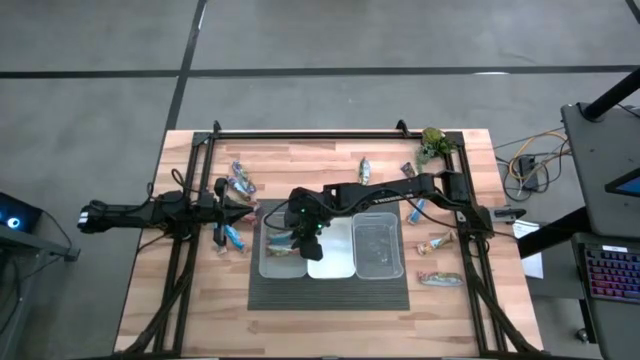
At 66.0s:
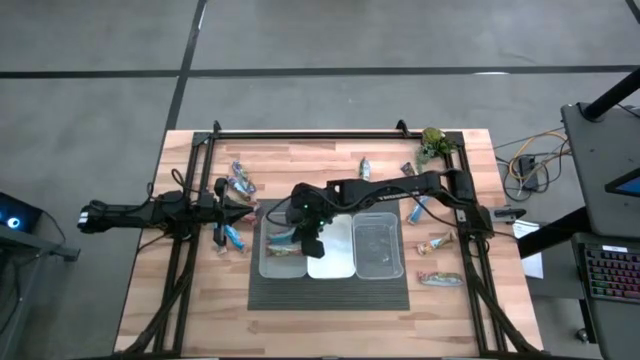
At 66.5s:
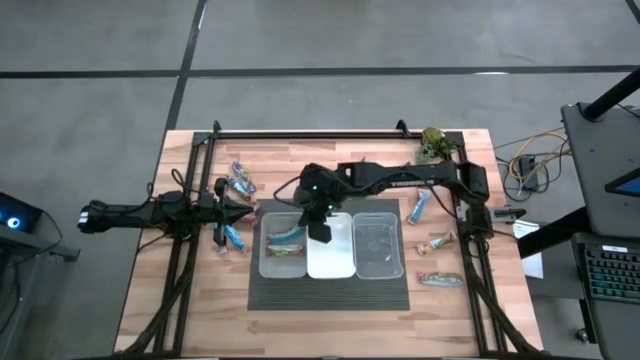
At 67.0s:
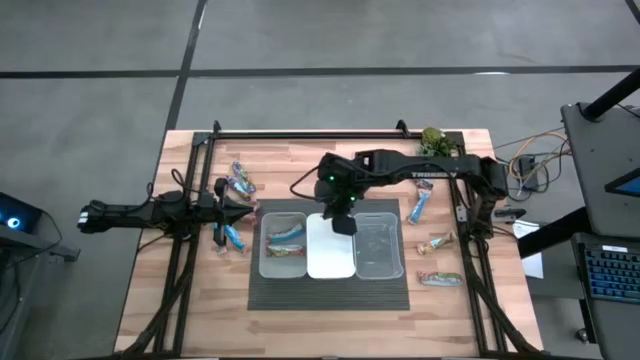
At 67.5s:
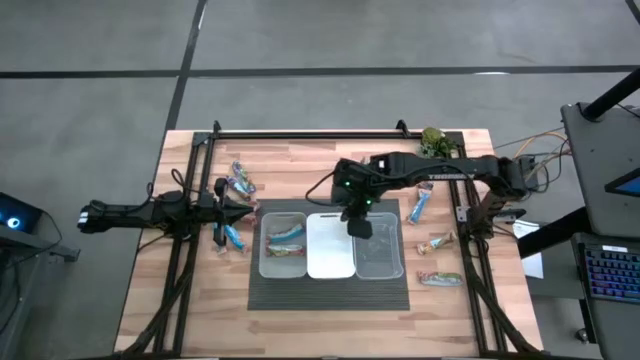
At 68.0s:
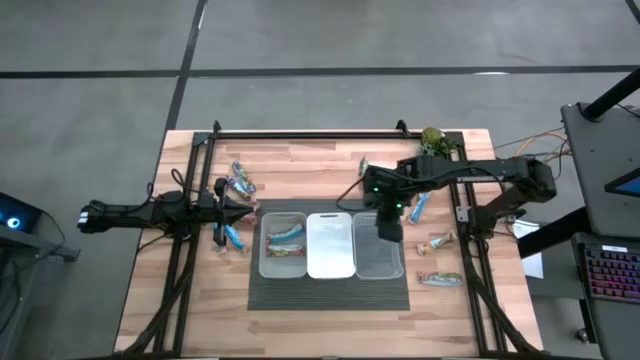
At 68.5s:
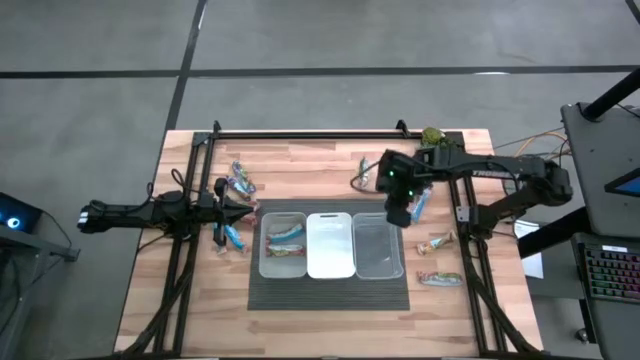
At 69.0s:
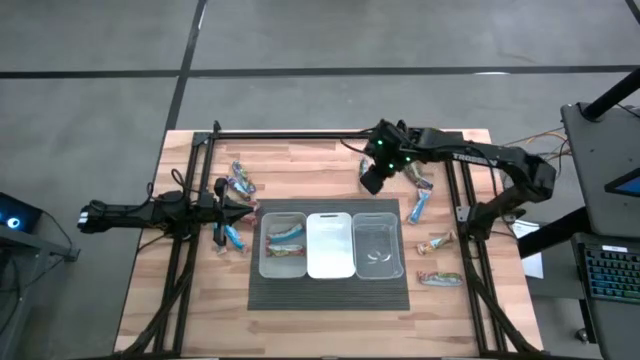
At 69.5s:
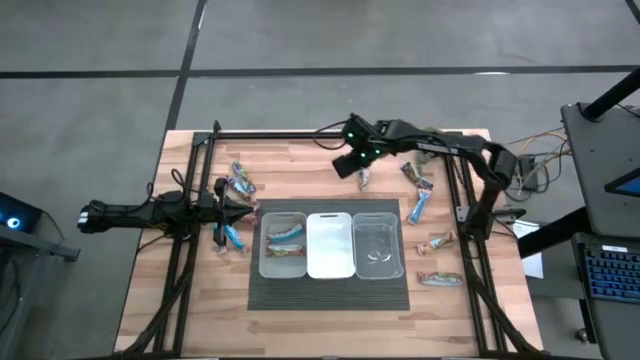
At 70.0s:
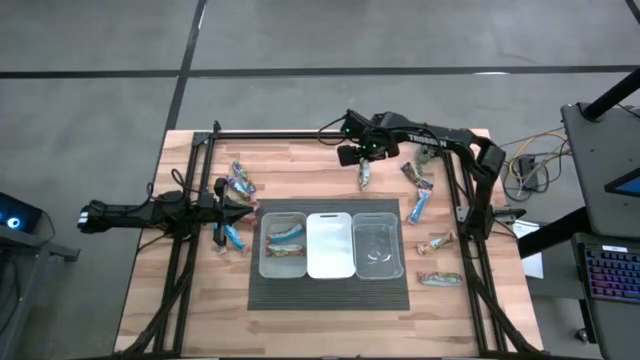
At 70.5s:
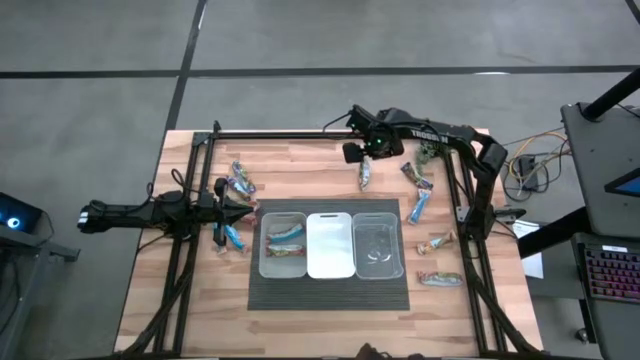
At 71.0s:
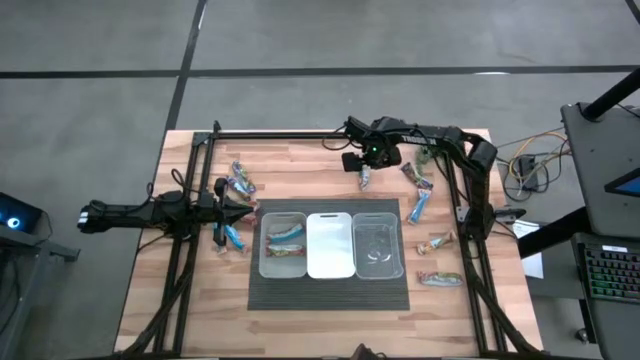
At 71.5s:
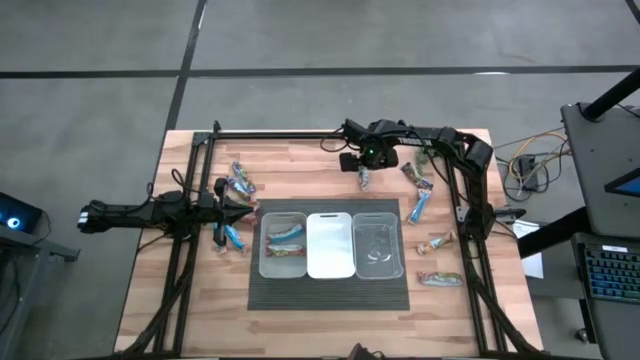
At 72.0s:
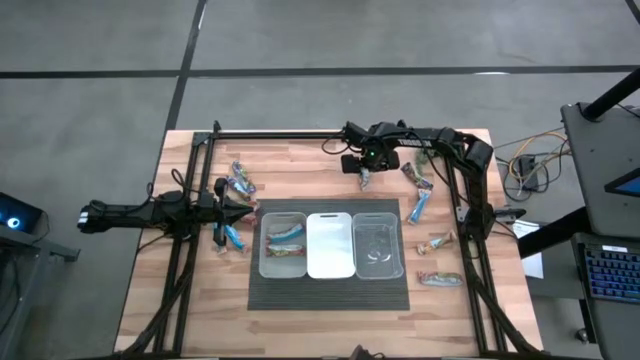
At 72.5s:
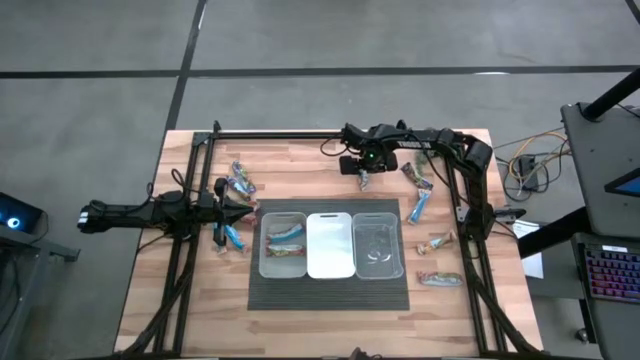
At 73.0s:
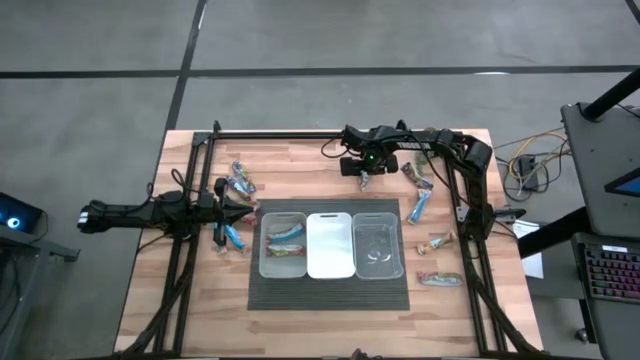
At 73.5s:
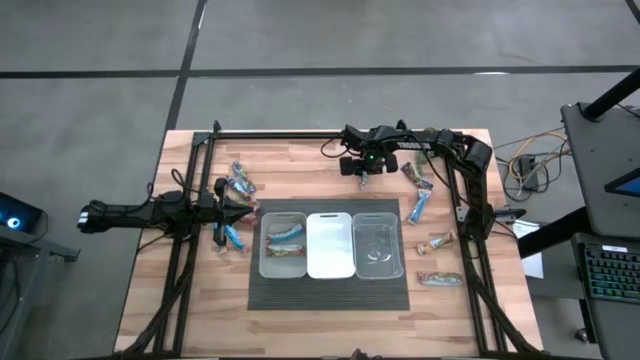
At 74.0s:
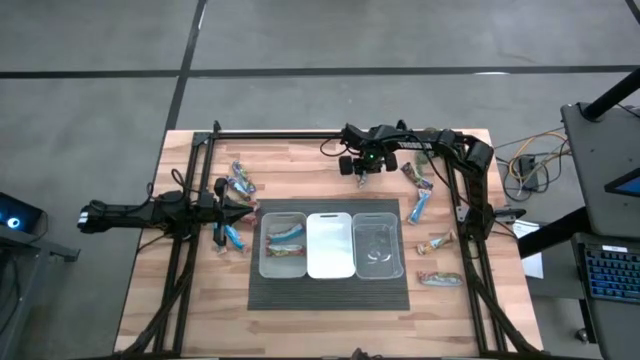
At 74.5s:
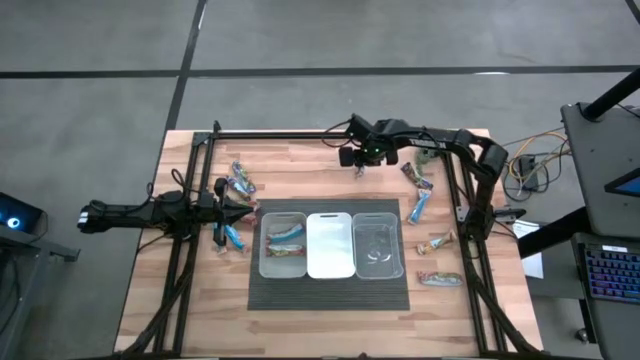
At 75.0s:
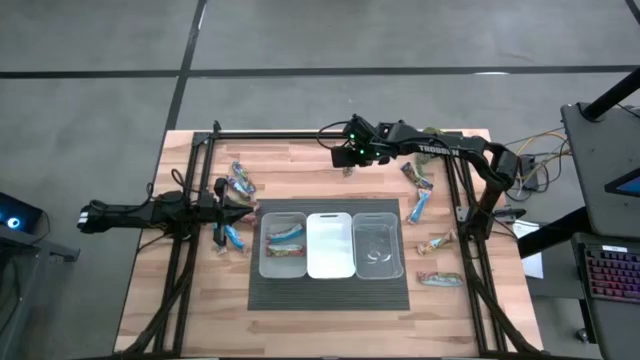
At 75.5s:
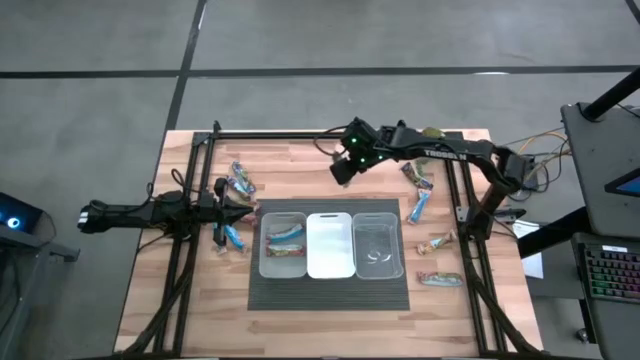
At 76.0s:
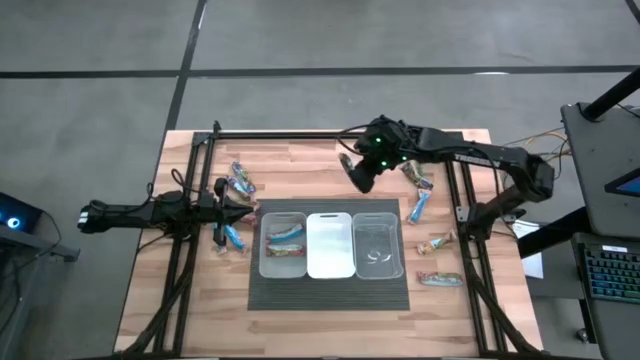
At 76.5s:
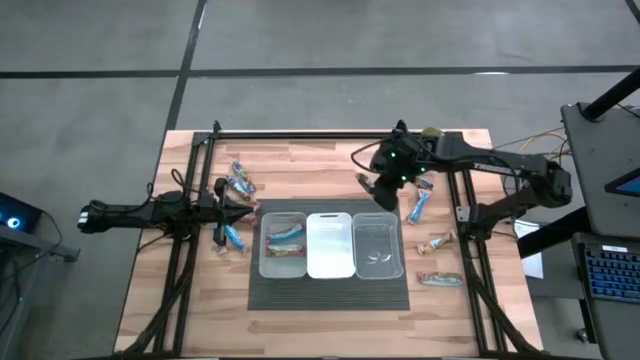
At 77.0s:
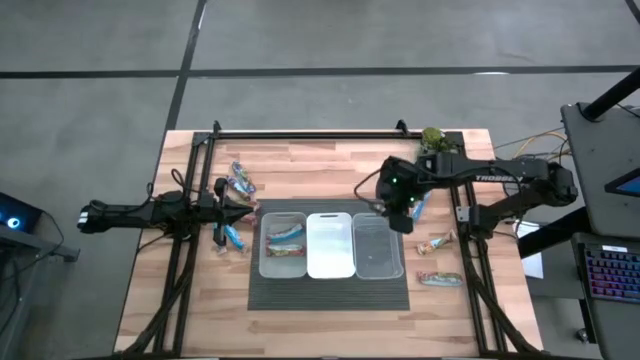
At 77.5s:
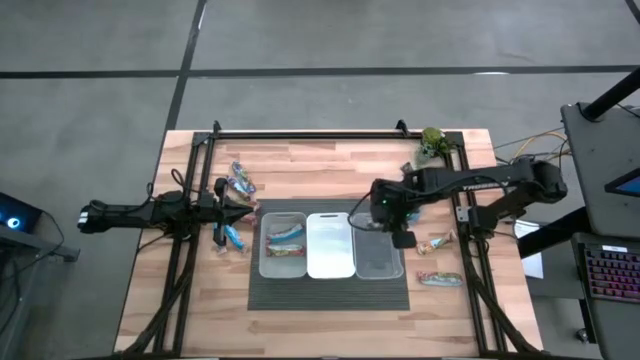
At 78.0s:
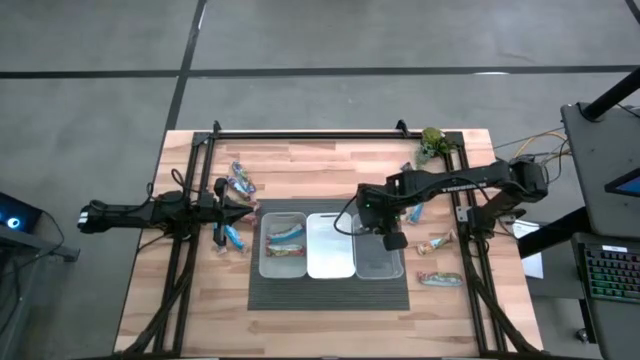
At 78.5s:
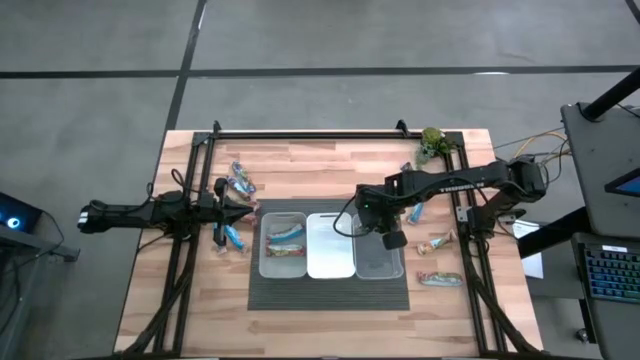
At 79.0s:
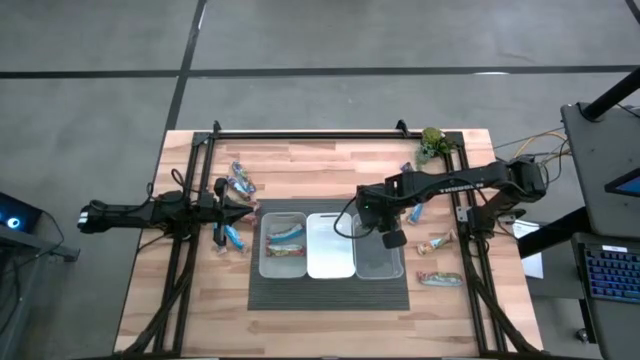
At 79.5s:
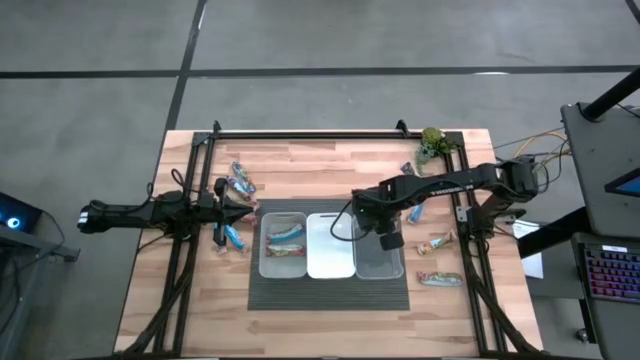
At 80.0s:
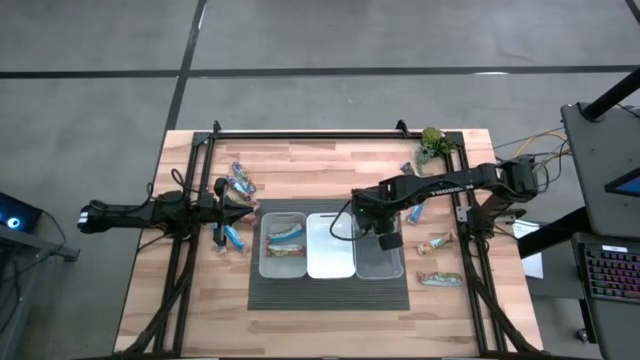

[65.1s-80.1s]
Task: Pick and place Granola Bars by type
Put the yellow granola bar into the transparent bin

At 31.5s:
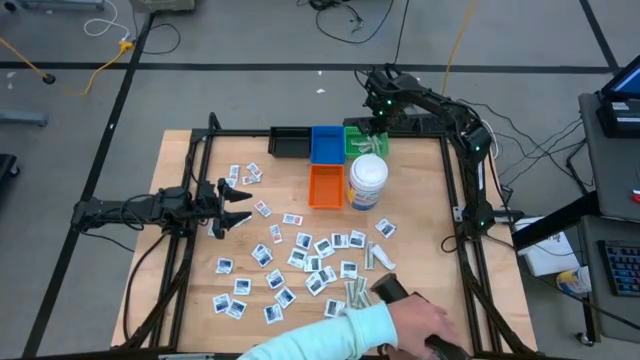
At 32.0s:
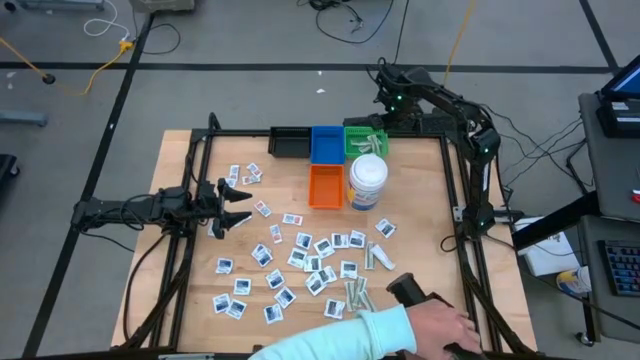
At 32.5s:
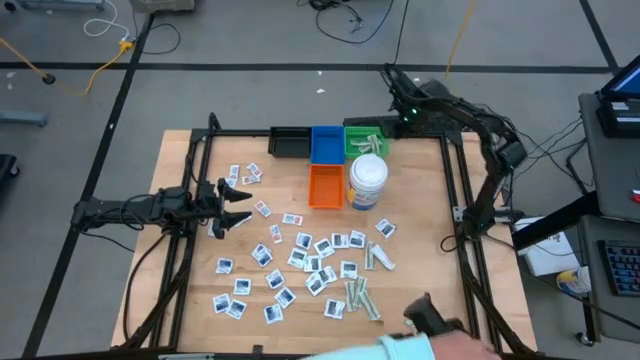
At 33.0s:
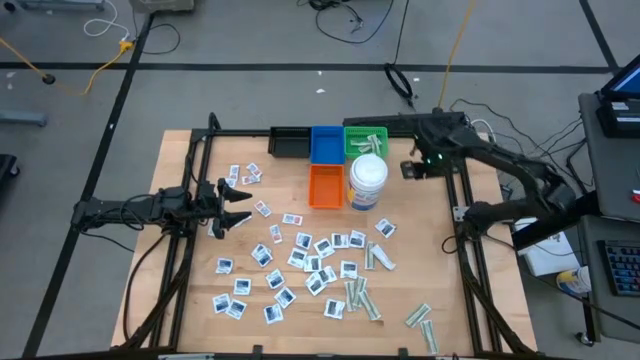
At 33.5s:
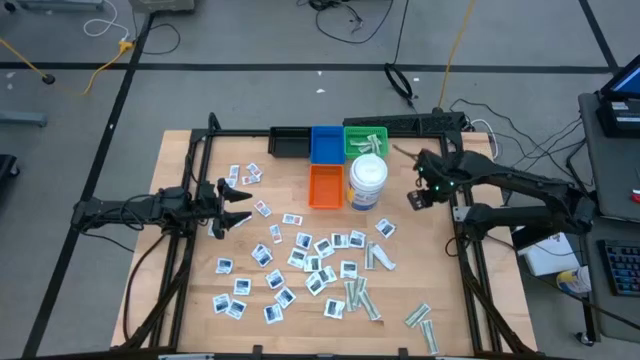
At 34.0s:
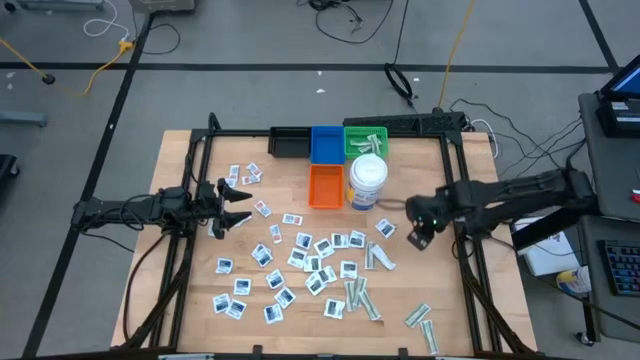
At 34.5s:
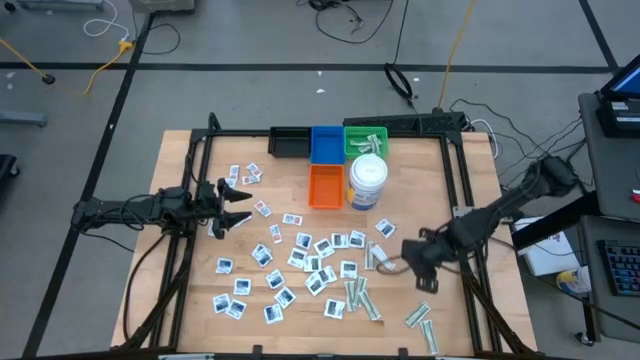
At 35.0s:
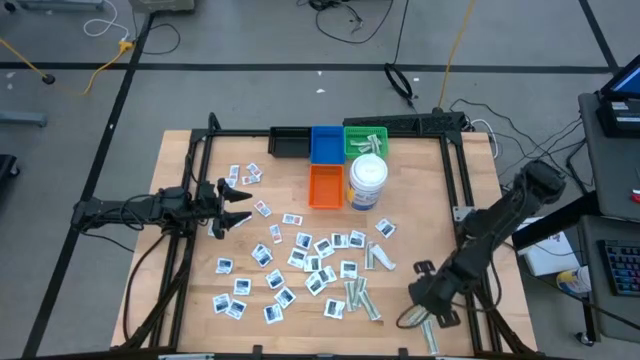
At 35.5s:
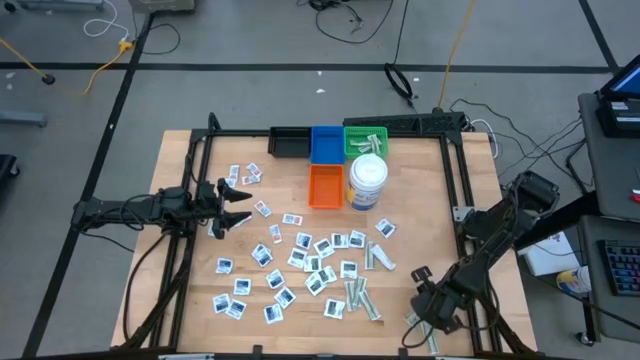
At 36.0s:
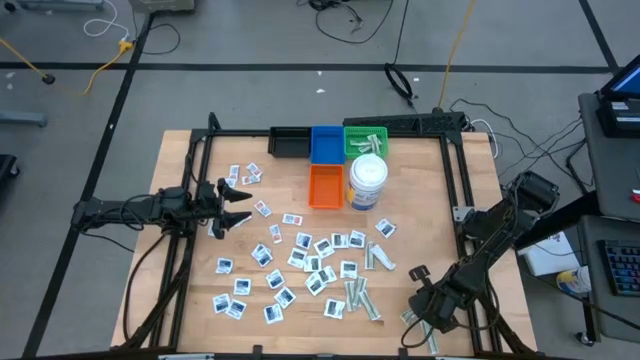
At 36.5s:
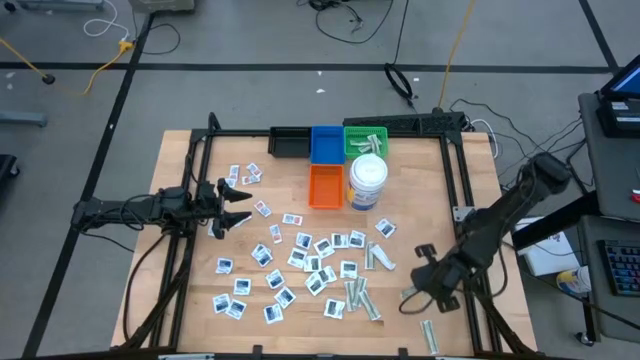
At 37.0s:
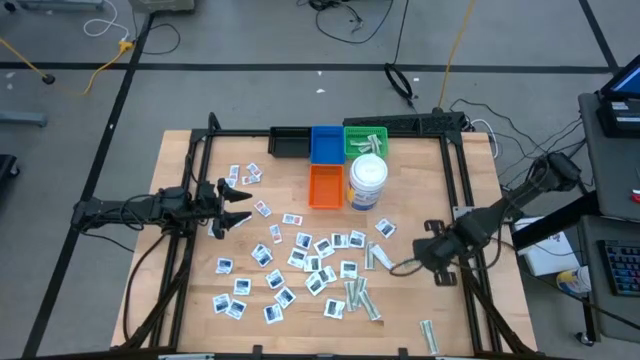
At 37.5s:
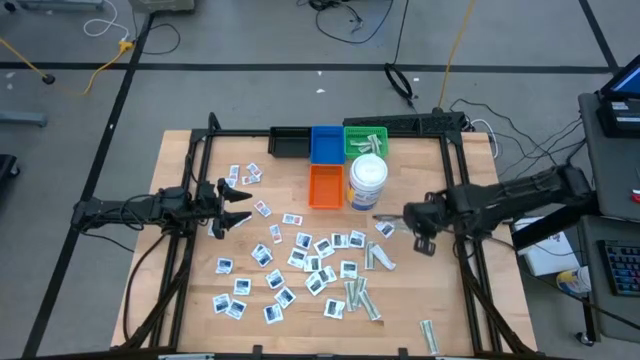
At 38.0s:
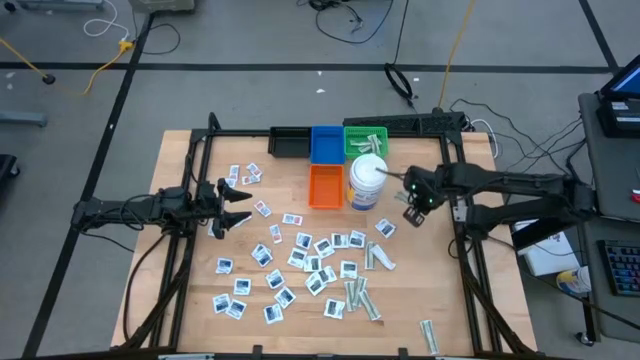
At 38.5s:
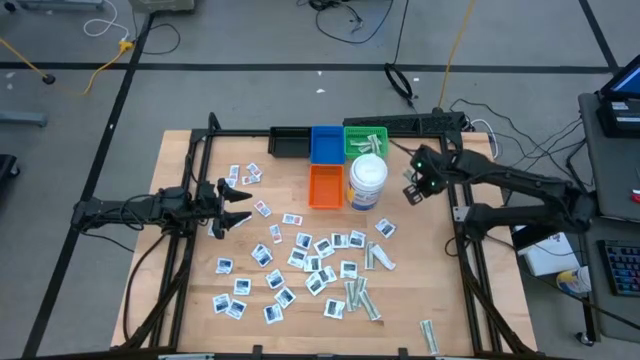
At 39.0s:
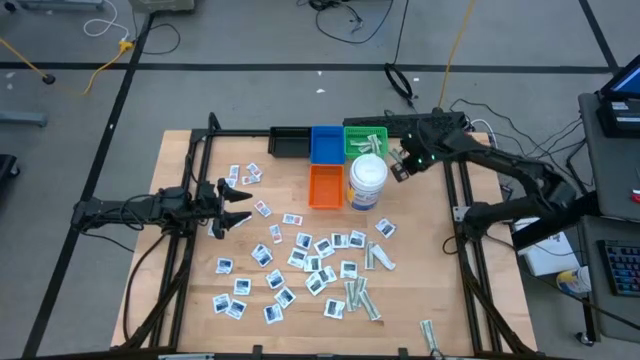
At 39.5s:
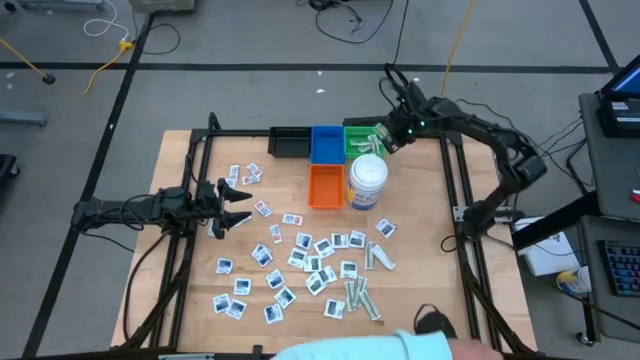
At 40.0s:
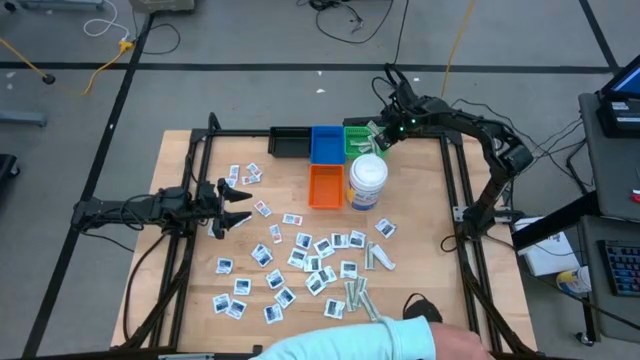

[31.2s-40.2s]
Task: Pick & Place First Aid Supplies
Put the green bandage pack into the green bin
